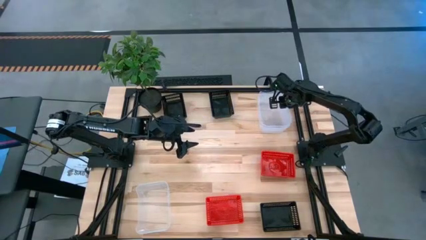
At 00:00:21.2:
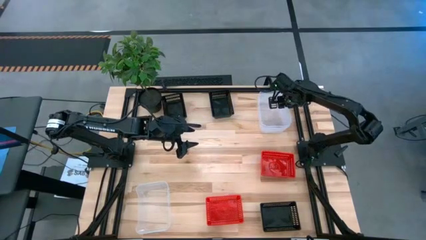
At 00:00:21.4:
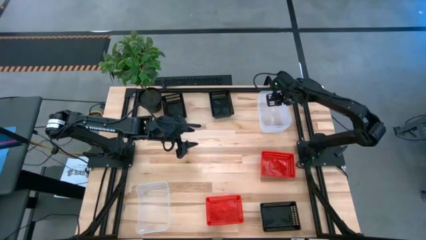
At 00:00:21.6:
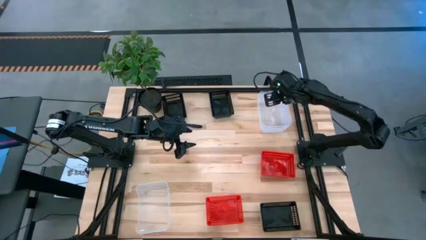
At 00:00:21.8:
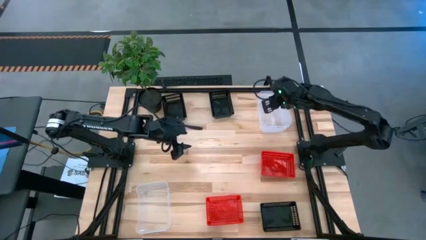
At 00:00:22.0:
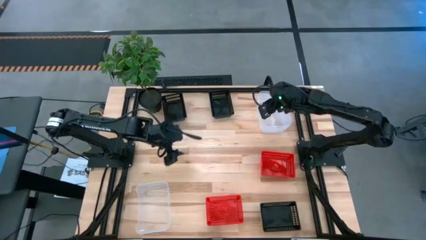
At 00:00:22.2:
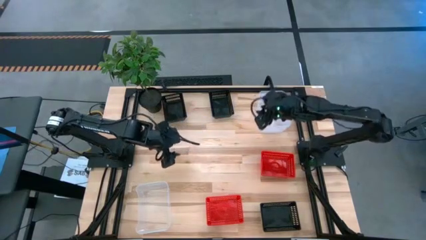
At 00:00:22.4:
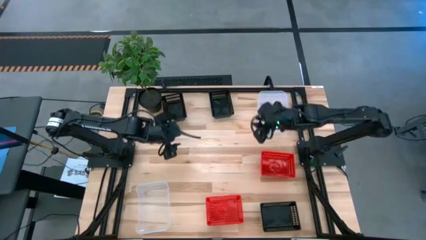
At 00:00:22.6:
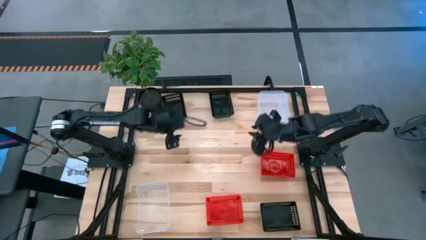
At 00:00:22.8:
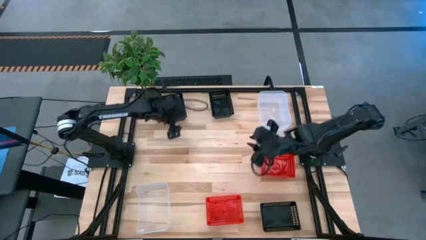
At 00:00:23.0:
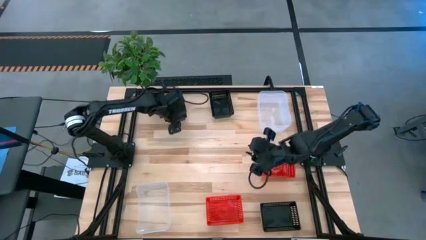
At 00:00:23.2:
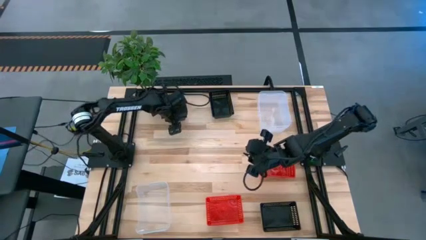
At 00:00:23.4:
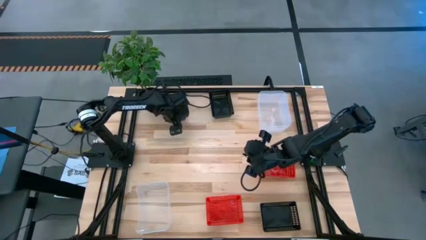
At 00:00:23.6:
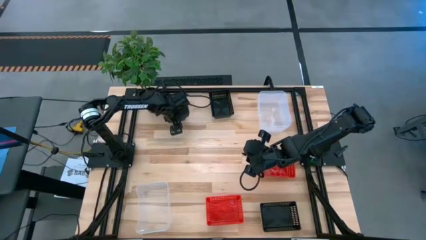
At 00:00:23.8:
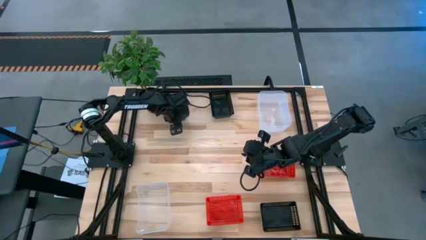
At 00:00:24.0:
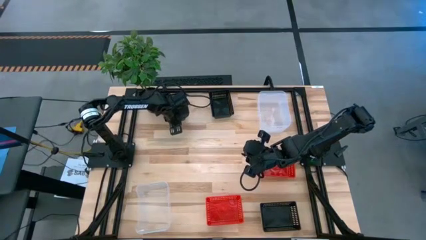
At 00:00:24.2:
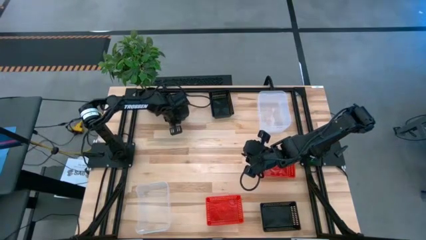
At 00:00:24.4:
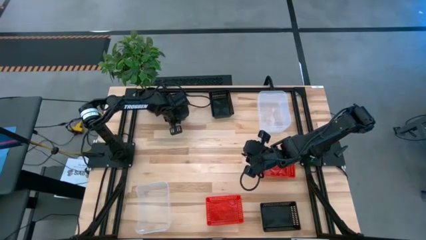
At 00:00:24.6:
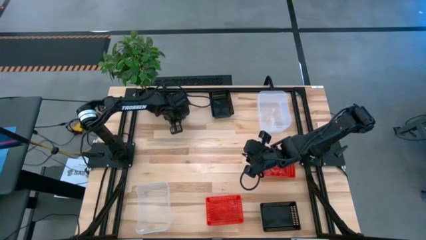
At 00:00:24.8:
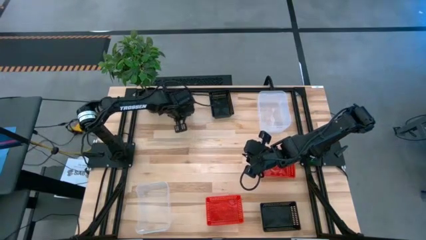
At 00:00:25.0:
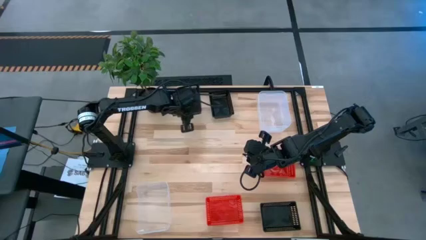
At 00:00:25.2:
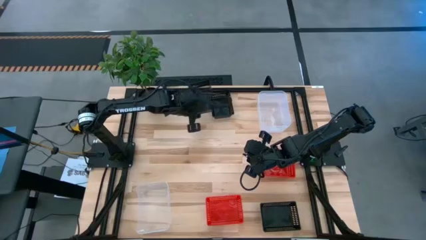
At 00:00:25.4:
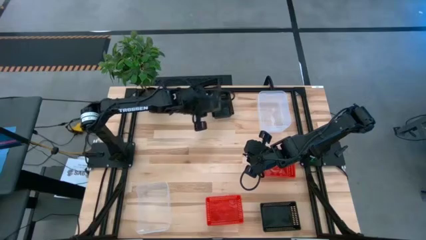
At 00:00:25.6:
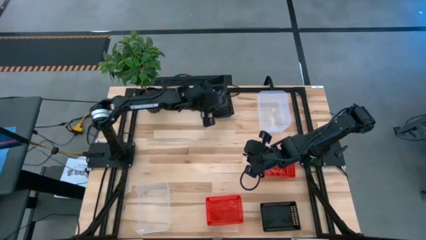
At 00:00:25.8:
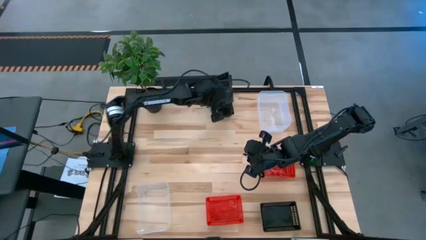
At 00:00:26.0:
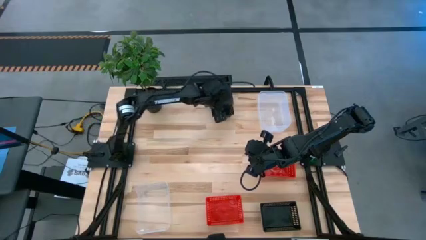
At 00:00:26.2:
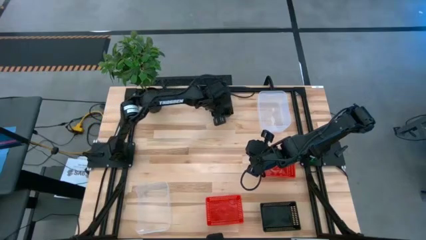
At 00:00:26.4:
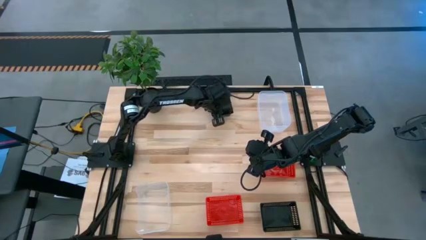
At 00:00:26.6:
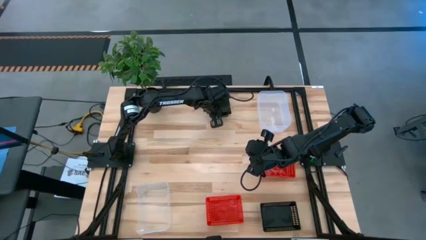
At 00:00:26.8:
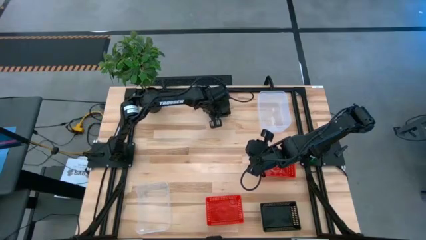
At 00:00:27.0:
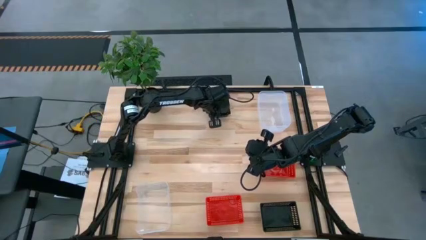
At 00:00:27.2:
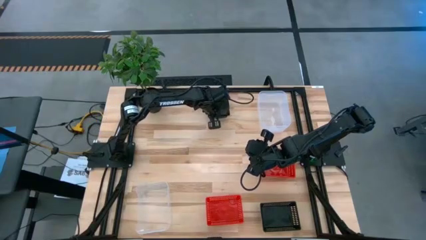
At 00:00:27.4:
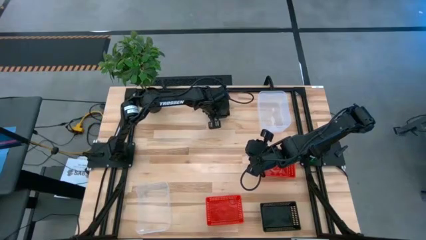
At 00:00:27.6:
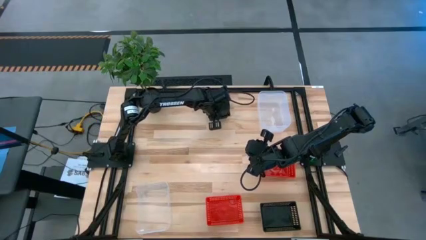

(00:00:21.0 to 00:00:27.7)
Stack the top left black bin on top of the top right black bin

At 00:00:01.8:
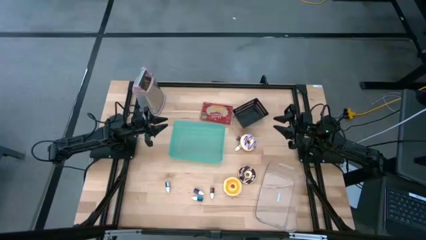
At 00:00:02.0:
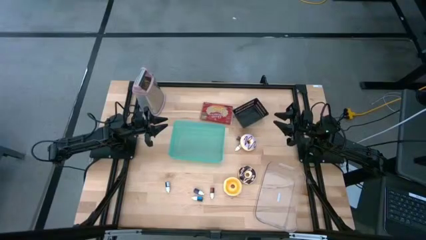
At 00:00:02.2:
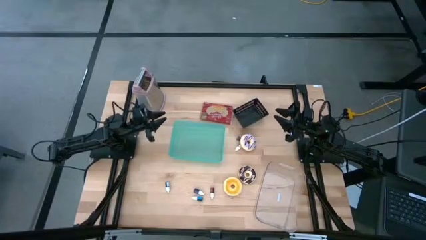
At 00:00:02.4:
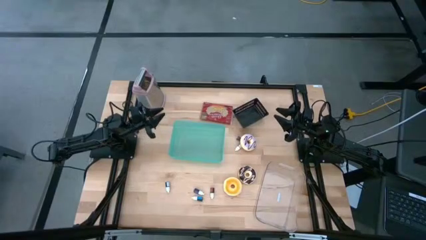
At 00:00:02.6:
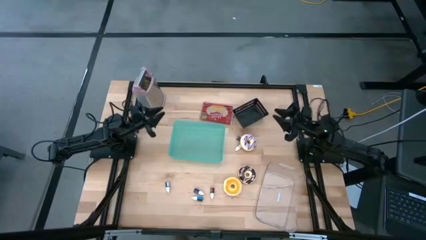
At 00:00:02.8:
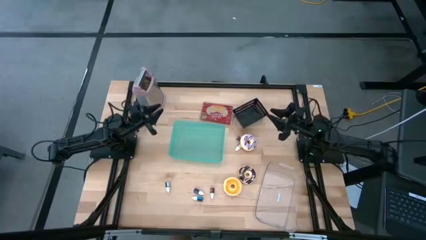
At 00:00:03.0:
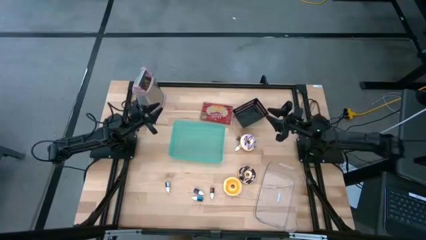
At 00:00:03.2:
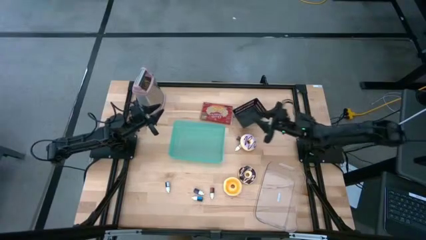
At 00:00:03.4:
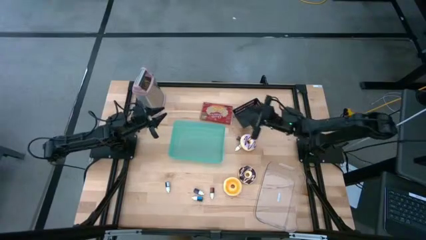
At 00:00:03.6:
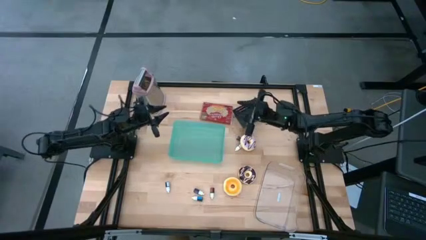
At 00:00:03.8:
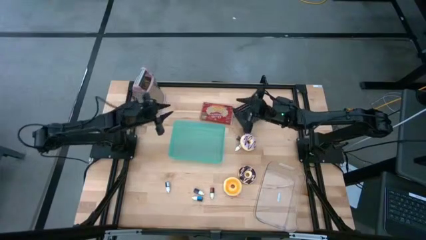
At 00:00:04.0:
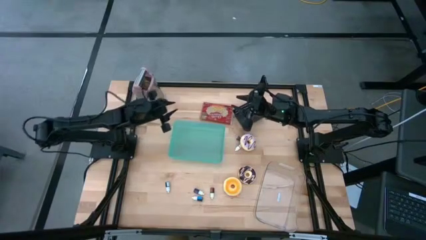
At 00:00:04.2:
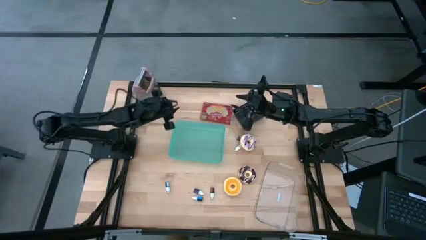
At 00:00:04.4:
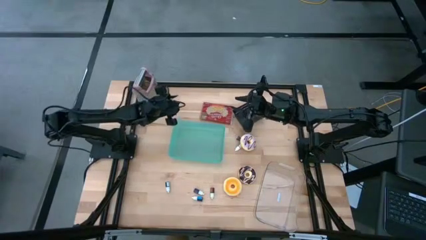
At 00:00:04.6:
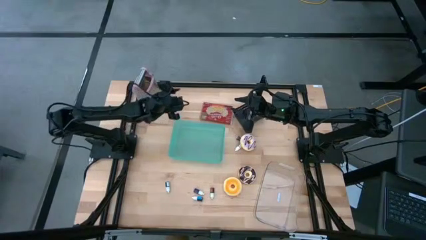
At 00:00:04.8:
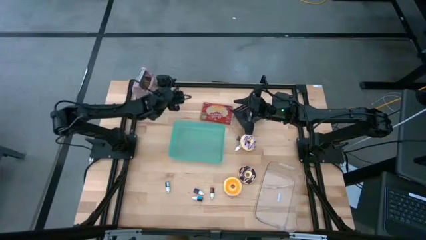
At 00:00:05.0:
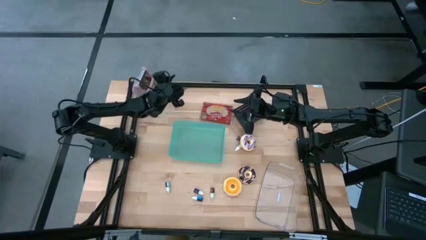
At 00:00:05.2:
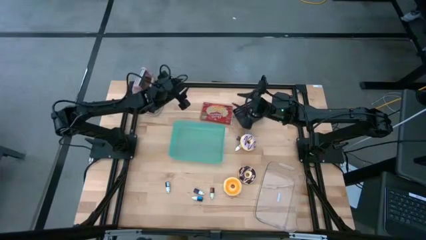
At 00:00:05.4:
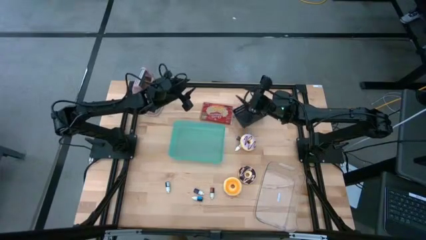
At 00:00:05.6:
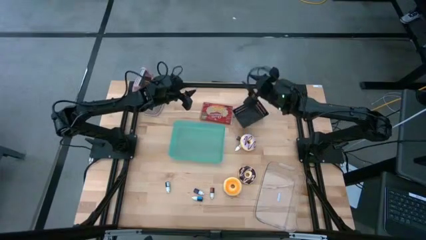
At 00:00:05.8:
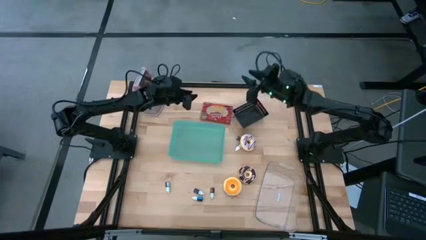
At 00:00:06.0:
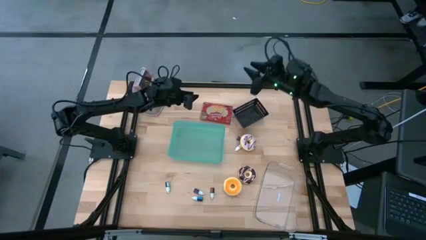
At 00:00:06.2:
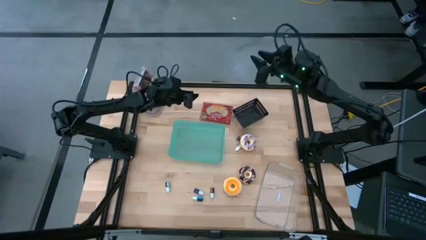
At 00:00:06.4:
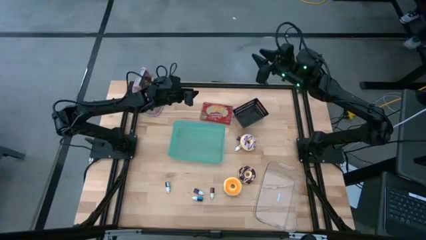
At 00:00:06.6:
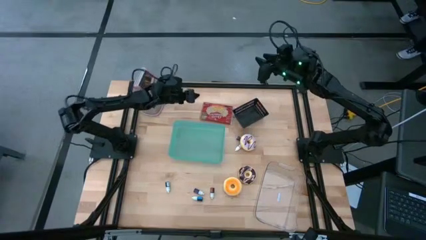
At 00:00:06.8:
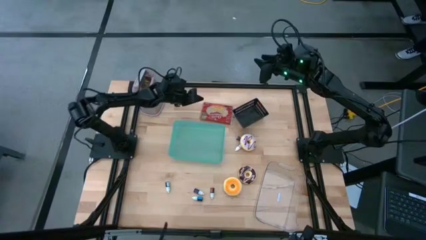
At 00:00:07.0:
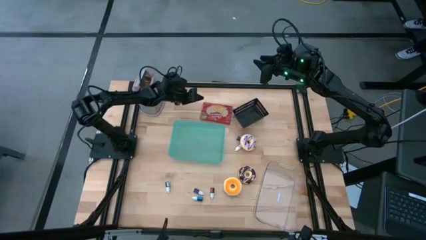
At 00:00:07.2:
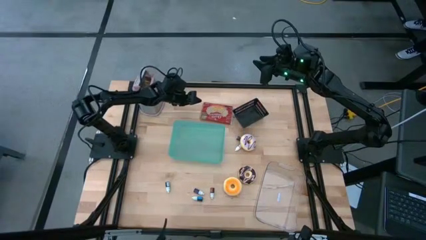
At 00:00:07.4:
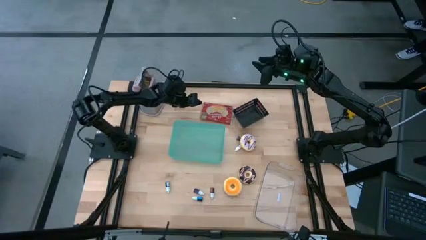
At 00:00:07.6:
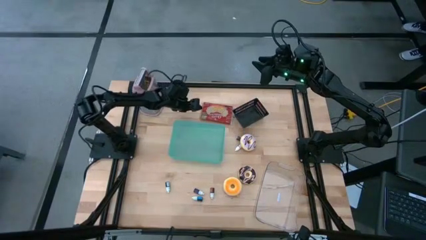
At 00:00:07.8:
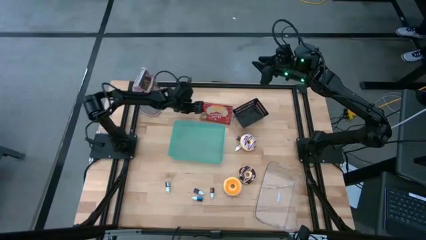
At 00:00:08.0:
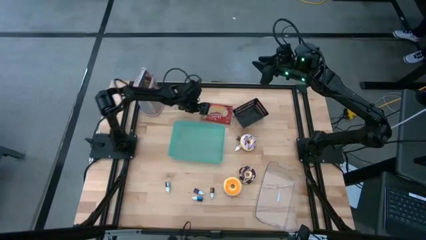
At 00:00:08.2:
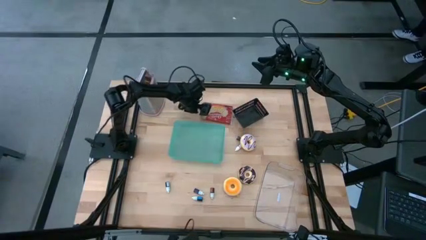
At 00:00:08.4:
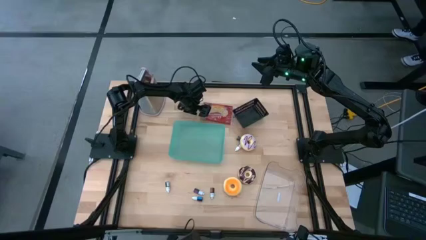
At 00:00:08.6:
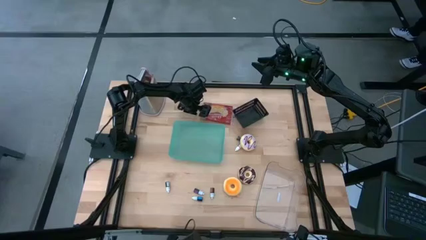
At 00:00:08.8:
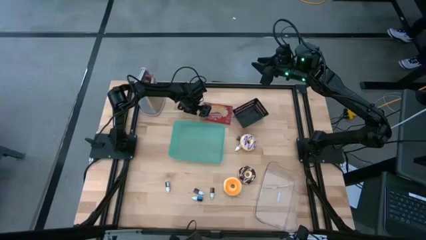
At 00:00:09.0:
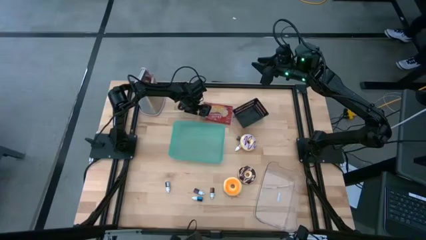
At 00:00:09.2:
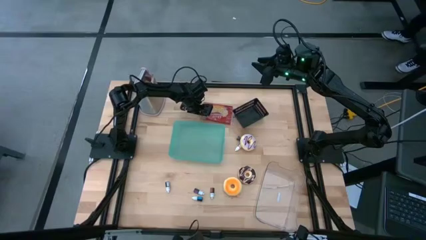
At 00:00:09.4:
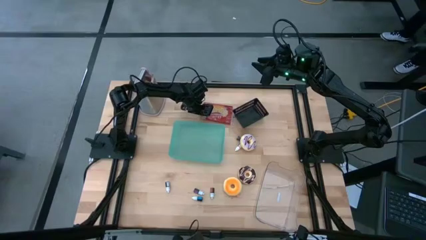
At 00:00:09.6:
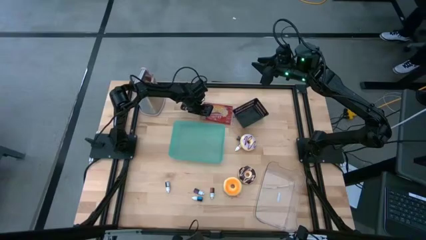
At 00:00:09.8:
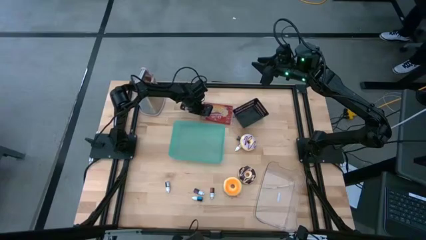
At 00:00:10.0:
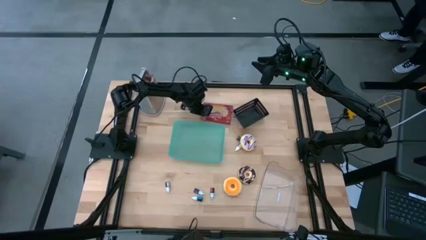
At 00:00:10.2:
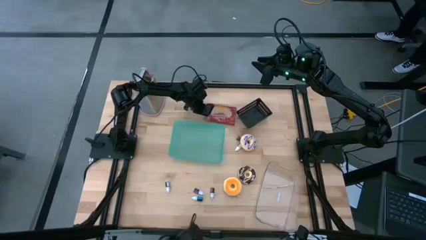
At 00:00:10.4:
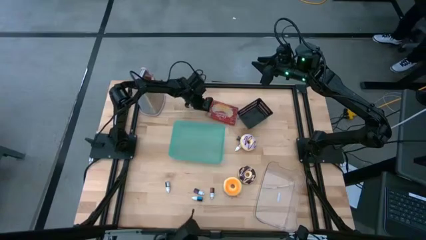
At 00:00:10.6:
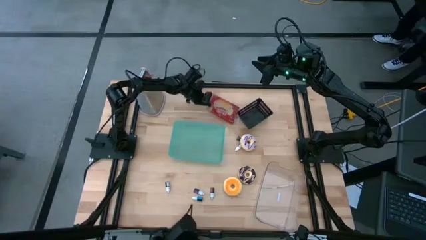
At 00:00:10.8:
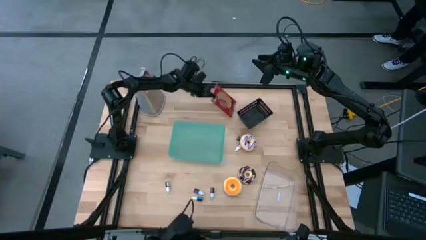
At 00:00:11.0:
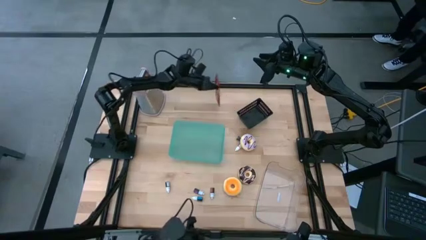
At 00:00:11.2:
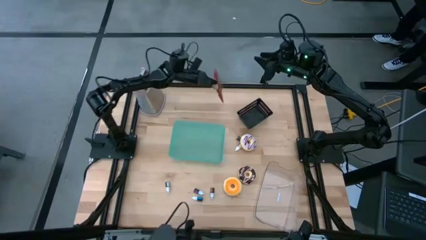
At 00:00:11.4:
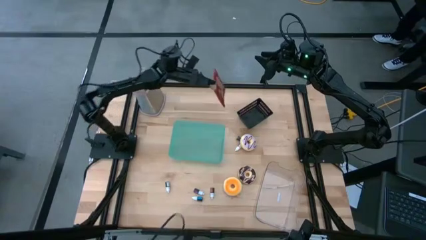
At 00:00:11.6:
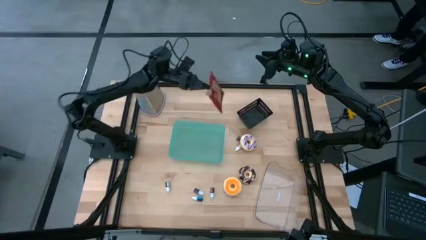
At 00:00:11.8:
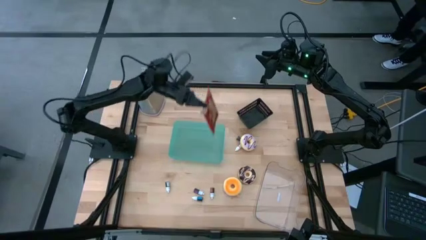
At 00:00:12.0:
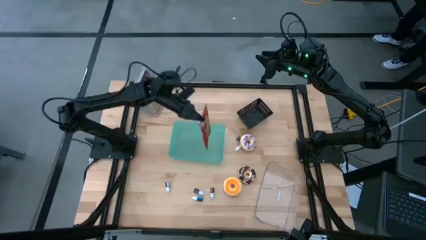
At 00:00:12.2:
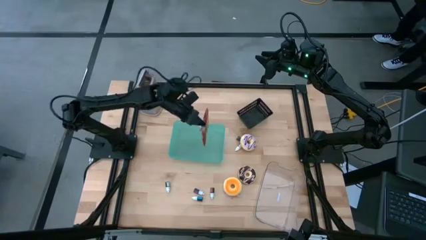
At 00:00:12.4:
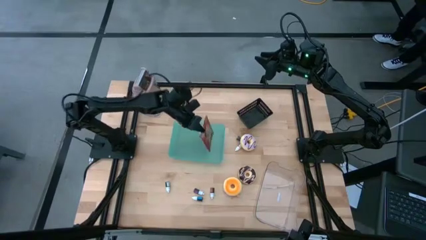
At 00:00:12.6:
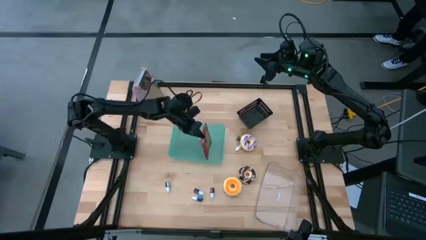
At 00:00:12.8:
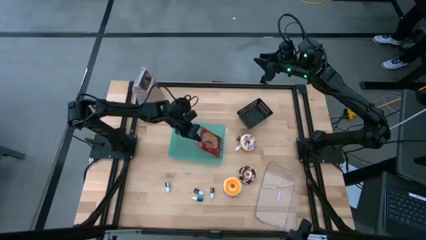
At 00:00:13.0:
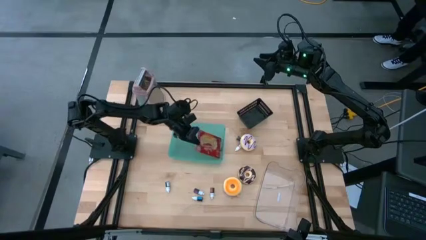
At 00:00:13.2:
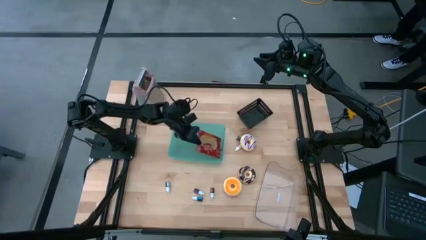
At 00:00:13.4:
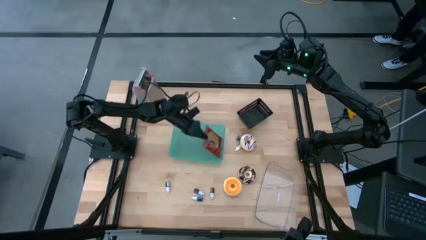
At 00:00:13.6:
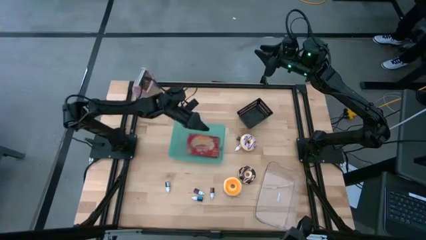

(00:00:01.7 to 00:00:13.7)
Put the red popcorn bag into the green bin
